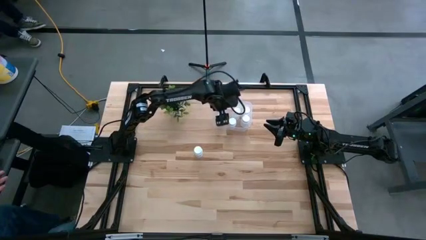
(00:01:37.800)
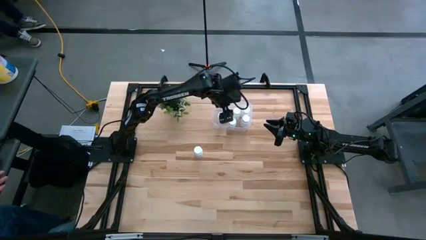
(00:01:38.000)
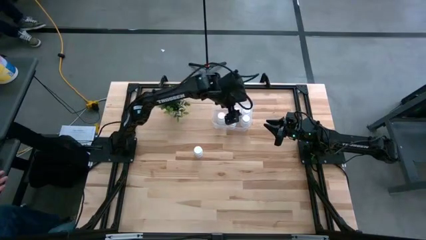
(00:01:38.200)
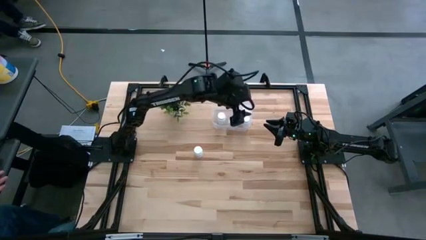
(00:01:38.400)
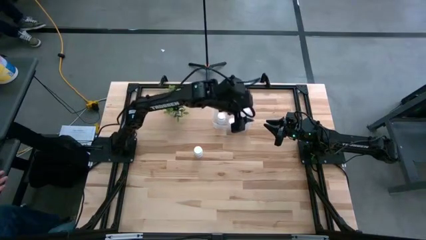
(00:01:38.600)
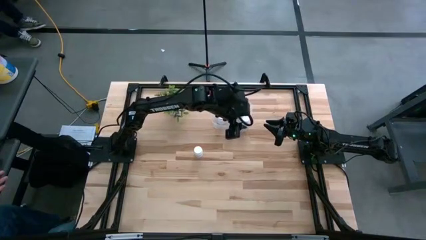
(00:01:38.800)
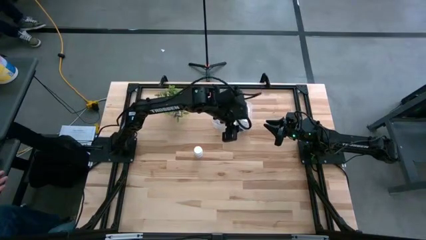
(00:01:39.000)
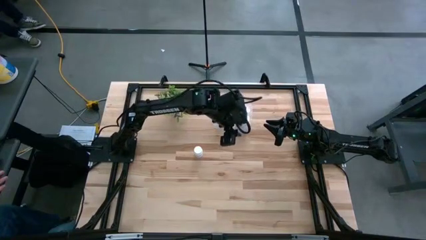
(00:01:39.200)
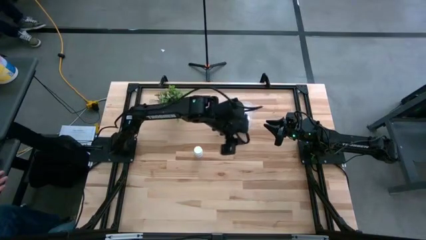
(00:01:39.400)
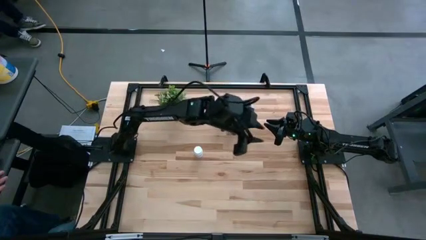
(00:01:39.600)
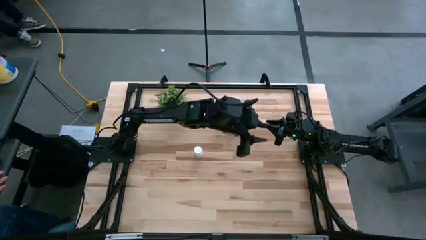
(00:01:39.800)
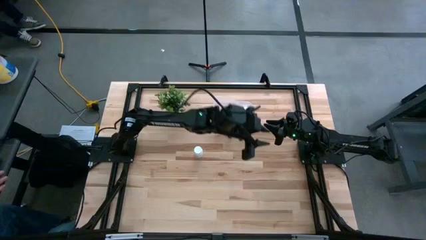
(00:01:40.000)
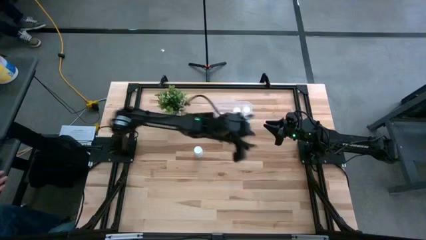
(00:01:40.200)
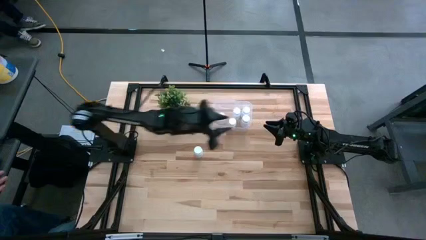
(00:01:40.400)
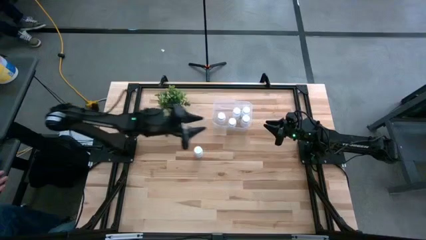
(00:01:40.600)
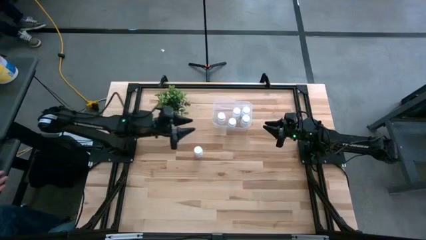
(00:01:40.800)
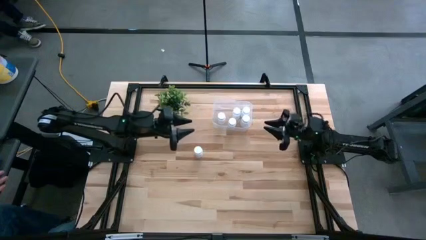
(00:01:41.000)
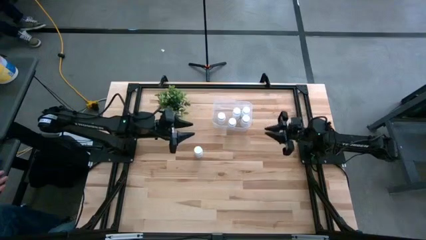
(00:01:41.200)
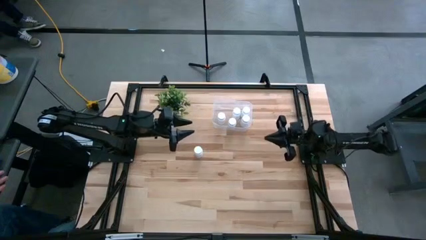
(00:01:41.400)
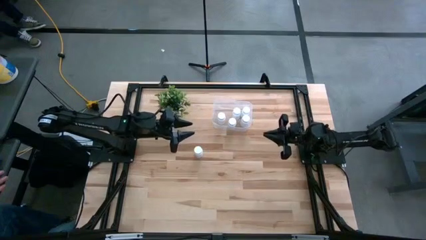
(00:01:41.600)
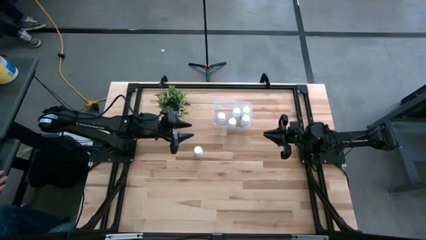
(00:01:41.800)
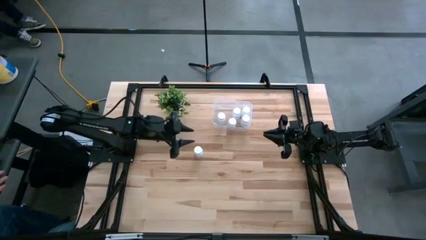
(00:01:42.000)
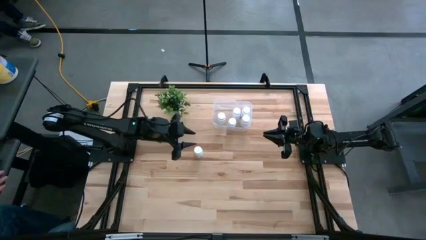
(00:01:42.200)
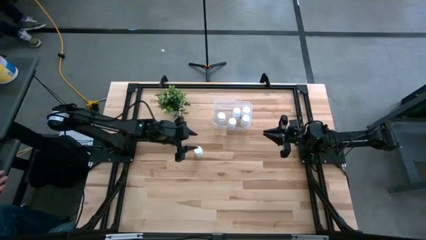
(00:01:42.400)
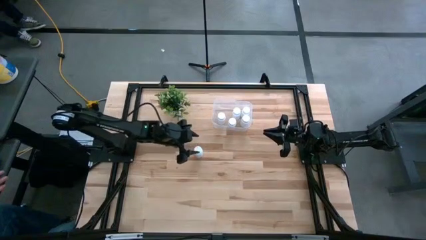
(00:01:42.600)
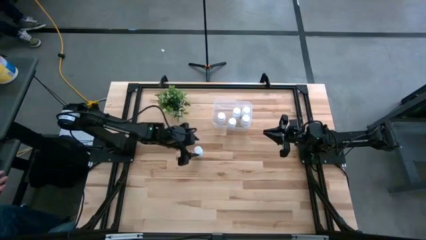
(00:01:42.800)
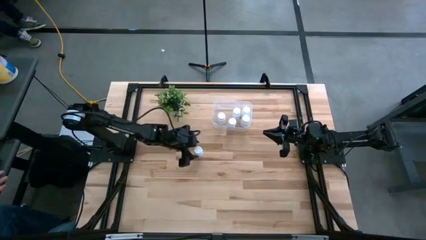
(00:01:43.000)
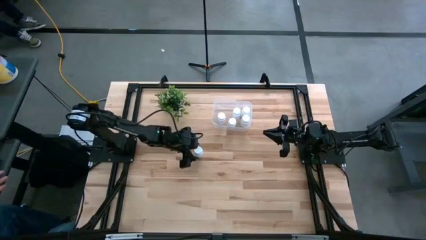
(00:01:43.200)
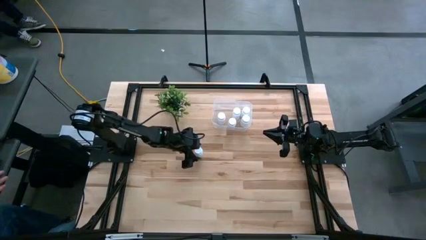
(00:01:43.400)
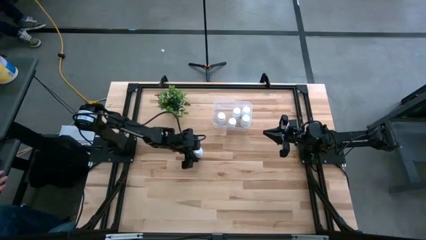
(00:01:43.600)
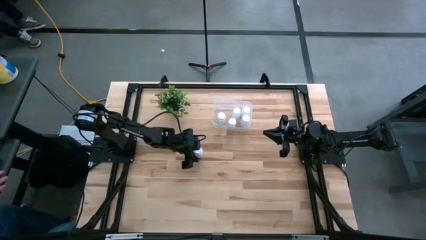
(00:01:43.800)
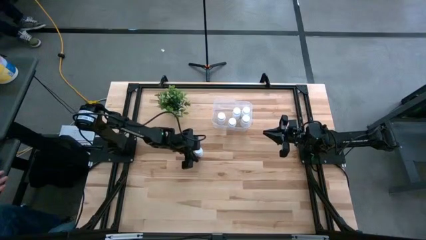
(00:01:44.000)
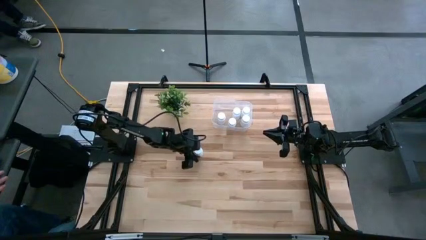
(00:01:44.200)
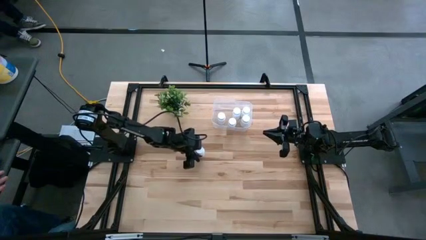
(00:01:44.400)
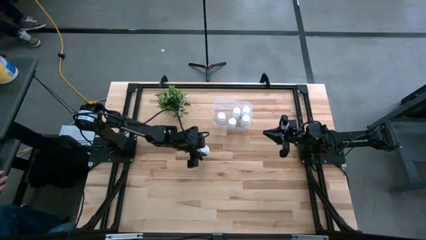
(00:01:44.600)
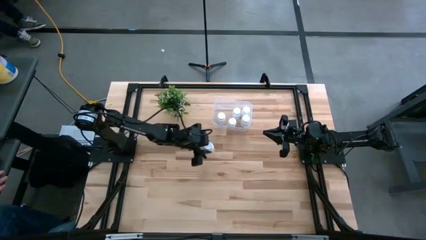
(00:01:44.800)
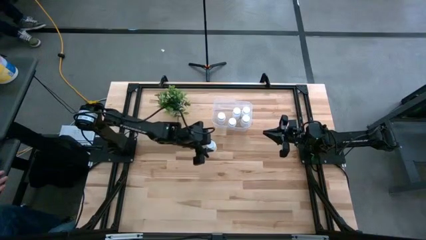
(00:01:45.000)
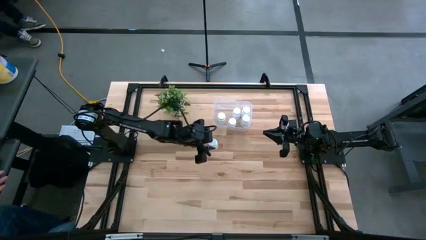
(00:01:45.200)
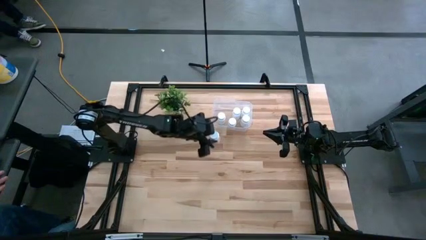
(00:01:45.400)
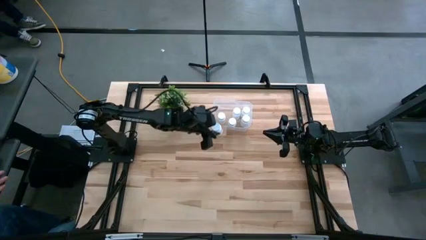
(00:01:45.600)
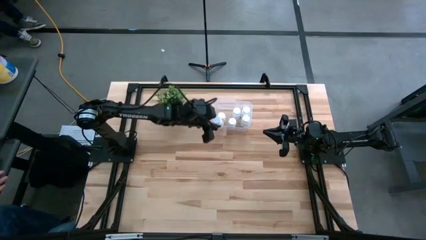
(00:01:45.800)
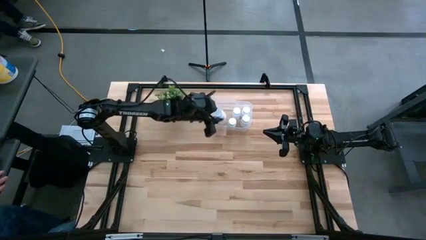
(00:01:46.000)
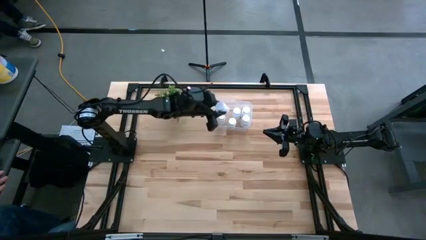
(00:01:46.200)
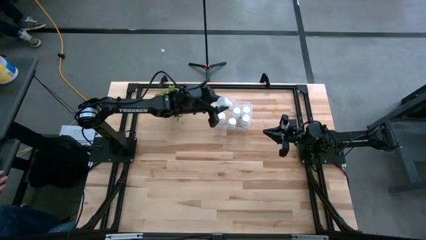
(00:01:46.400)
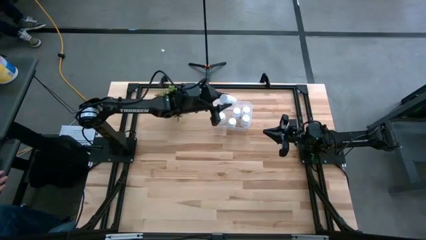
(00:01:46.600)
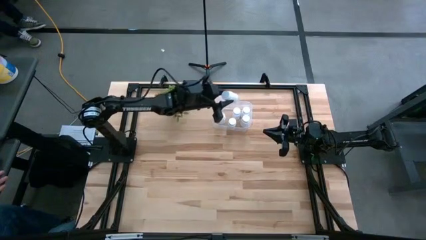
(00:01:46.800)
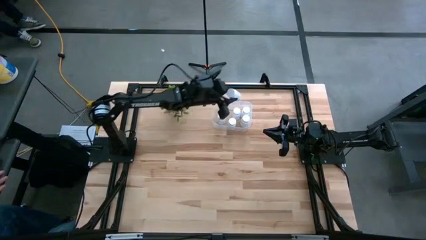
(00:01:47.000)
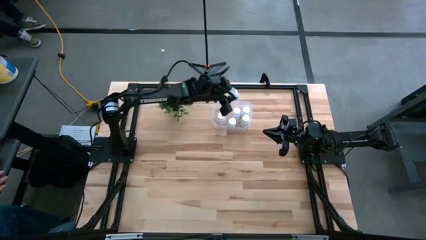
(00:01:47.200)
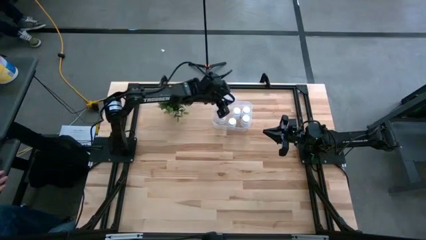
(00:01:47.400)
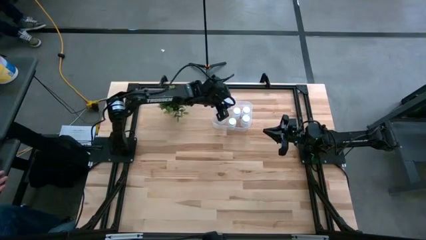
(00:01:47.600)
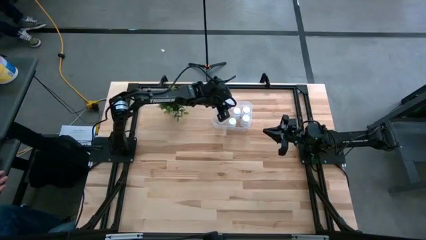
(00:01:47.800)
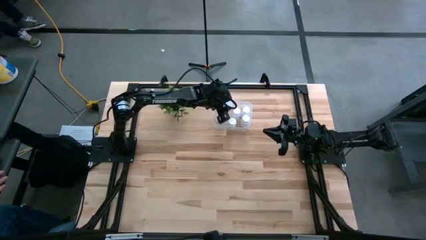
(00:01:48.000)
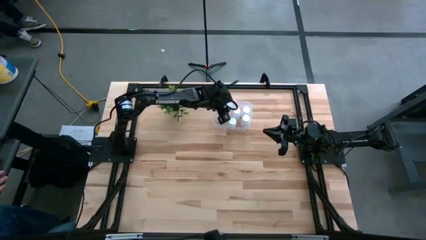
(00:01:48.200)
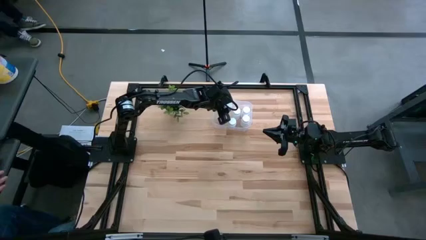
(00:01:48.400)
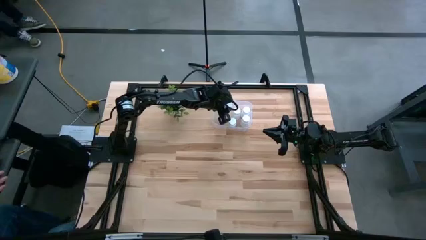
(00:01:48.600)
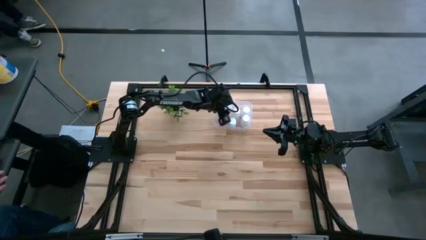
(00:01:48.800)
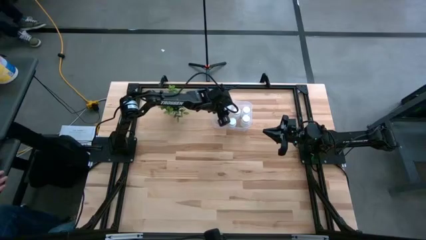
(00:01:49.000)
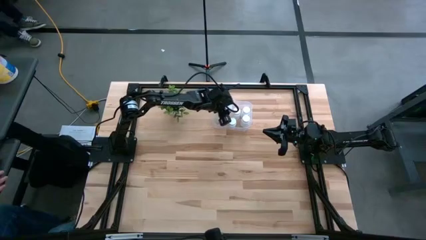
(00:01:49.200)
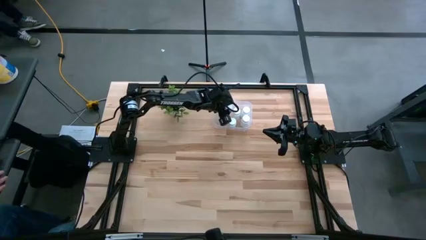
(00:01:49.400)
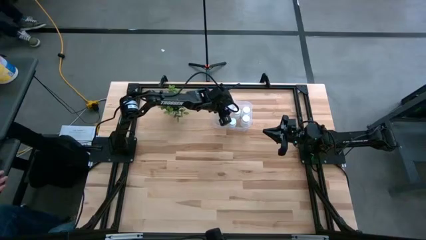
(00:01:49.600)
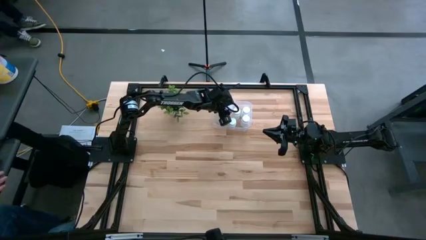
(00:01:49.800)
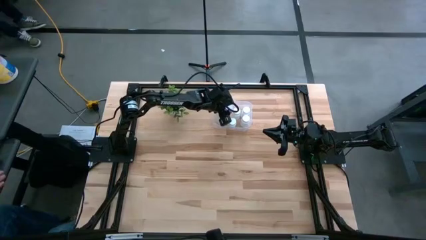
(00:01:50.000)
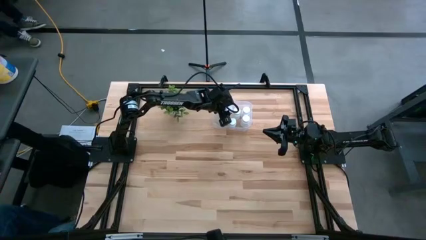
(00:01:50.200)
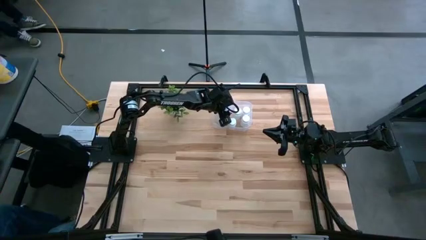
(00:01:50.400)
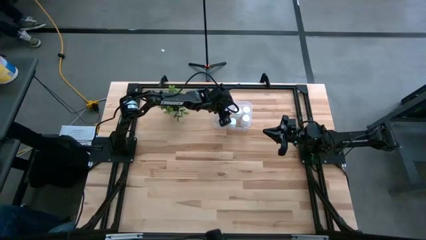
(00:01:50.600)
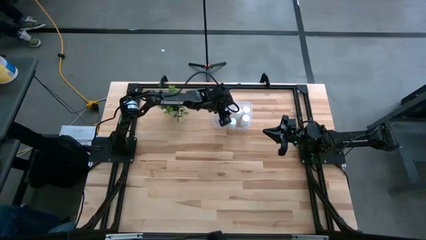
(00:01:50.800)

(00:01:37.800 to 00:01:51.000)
Task: Pick and place pill bottles into a basket
Put the white pill bottle into the transparent container

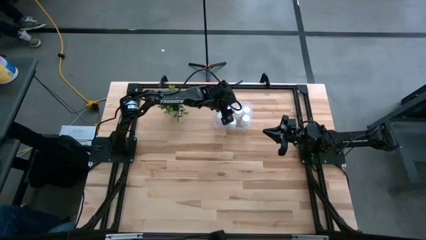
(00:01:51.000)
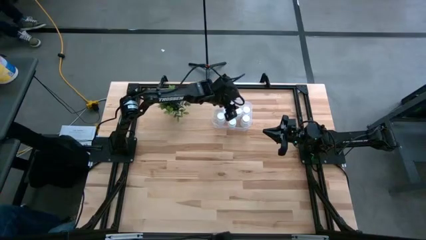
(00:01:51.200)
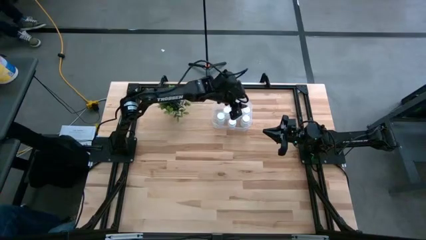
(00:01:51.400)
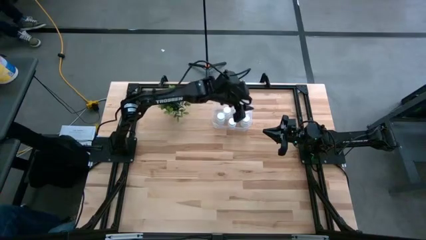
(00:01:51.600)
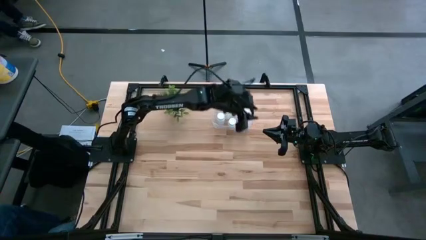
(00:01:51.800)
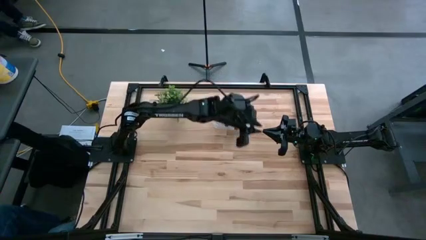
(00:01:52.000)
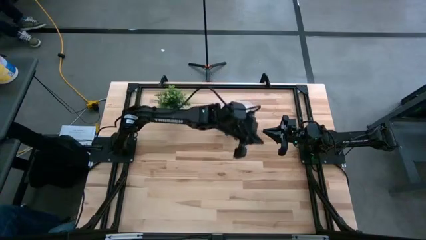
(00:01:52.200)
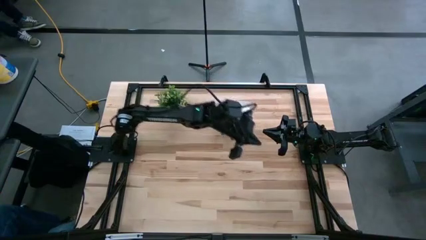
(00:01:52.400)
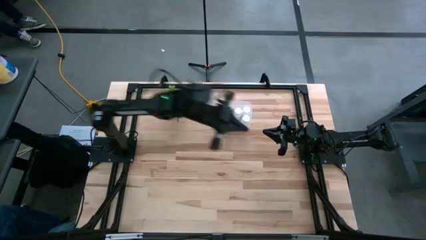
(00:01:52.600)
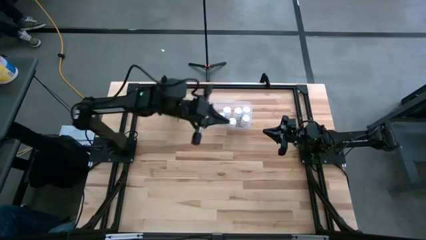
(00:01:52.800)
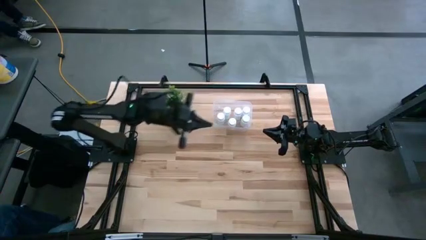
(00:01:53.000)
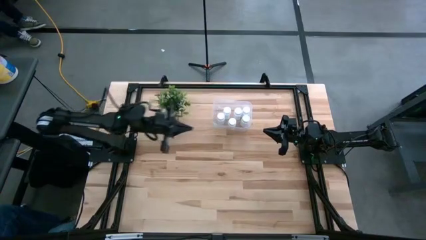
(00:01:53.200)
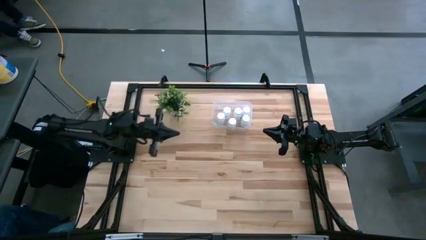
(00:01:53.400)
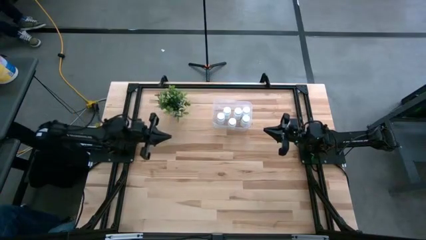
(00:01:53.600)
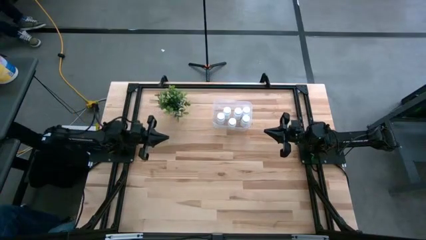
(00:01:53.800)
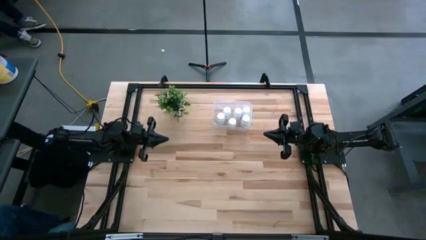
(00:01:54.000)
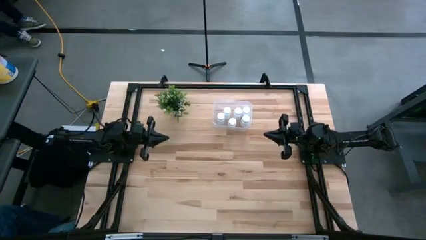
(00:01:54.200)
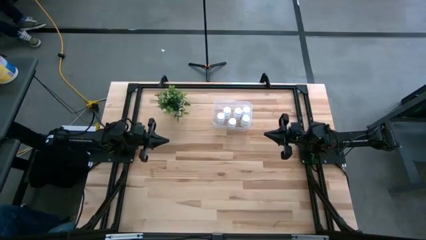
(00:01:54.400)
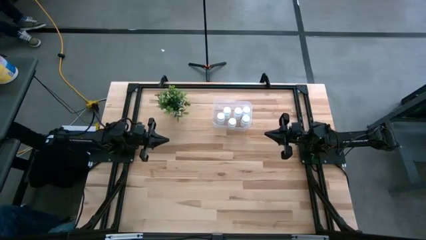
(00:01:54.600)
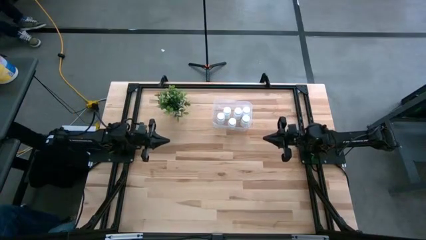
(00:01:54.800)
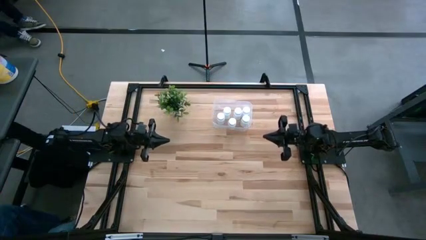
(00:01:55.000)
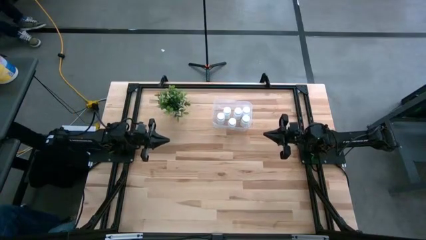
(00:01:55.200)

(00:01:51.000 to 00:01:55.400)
Return to Home Position
